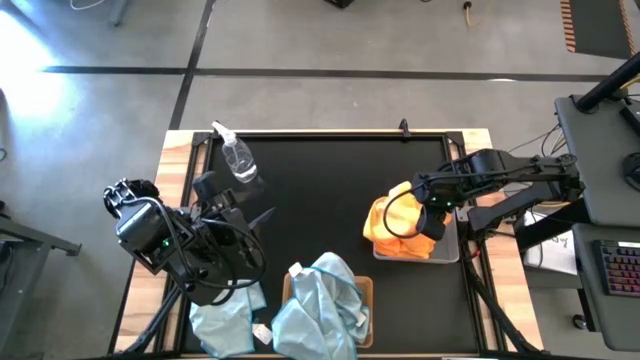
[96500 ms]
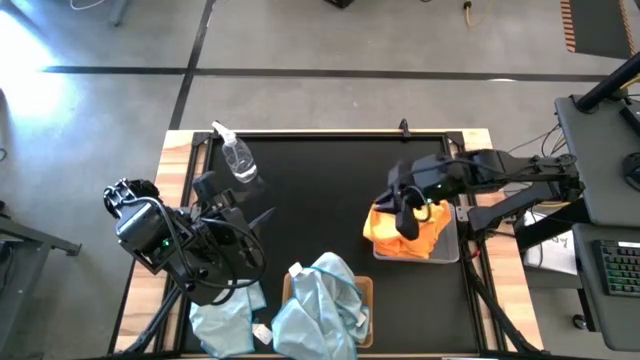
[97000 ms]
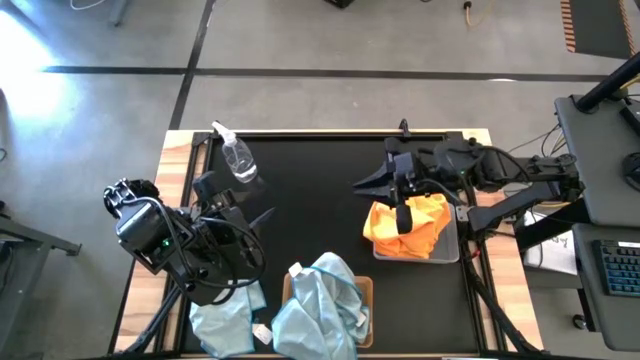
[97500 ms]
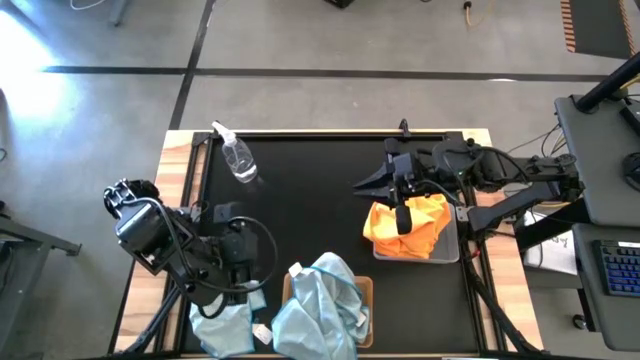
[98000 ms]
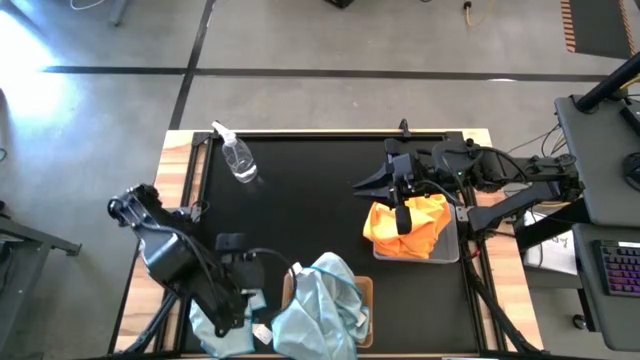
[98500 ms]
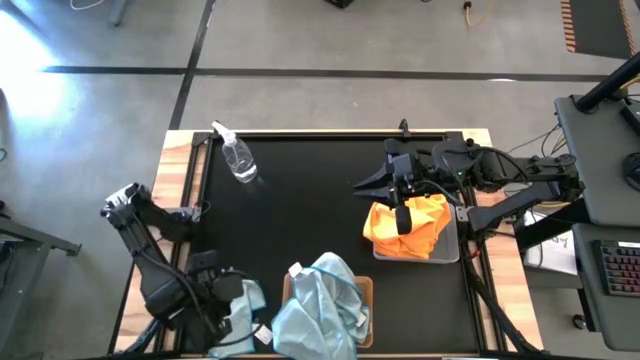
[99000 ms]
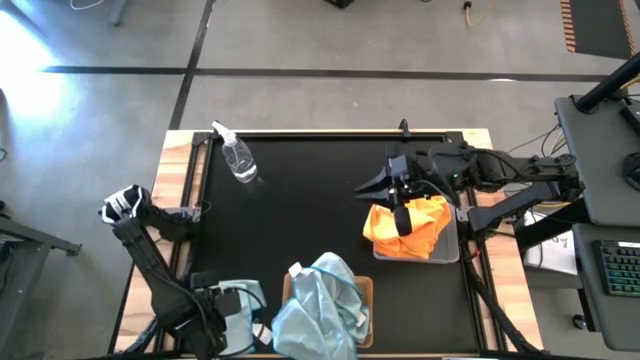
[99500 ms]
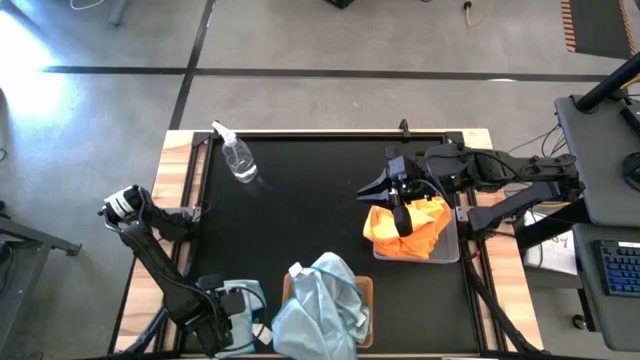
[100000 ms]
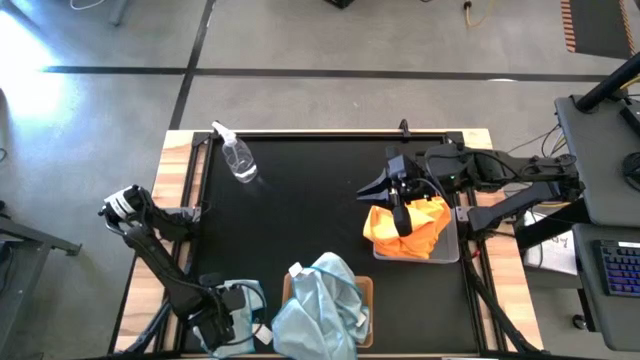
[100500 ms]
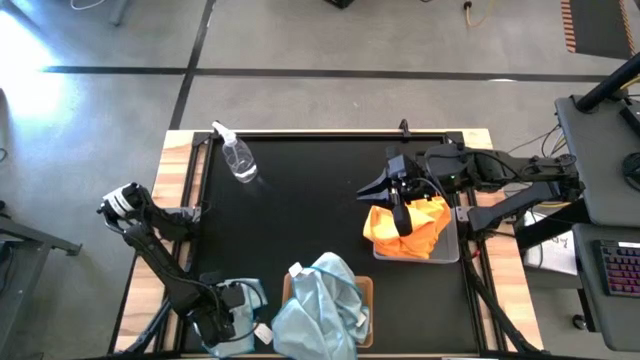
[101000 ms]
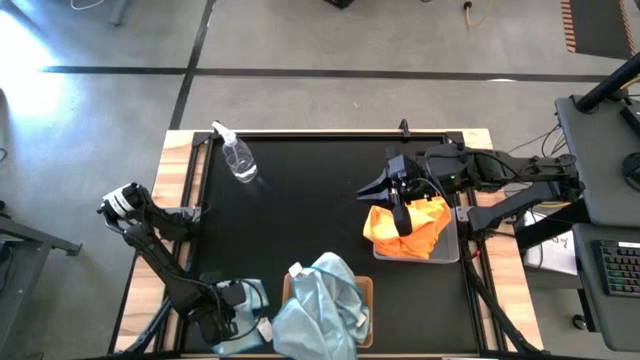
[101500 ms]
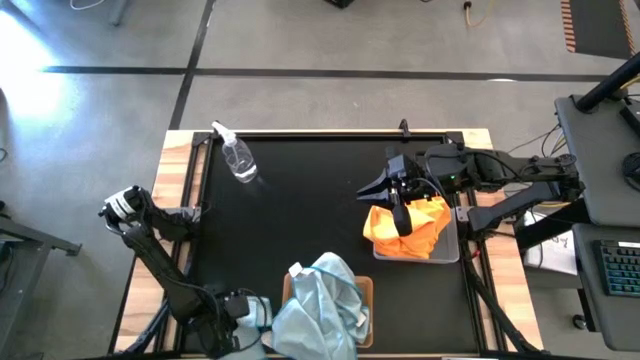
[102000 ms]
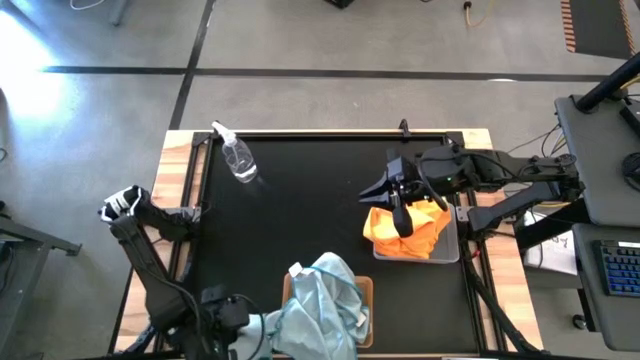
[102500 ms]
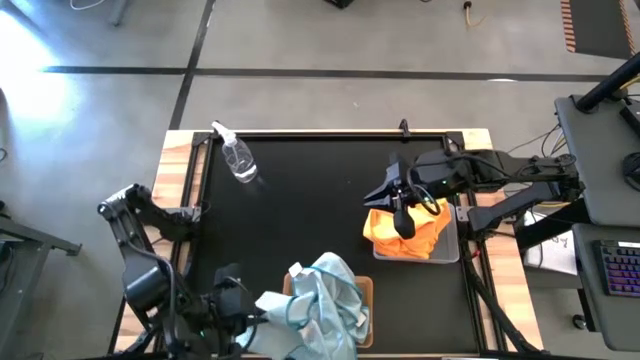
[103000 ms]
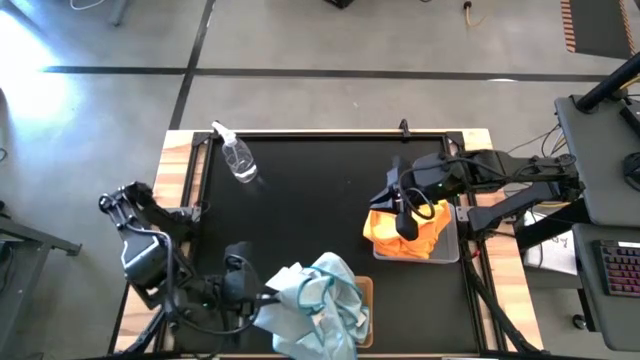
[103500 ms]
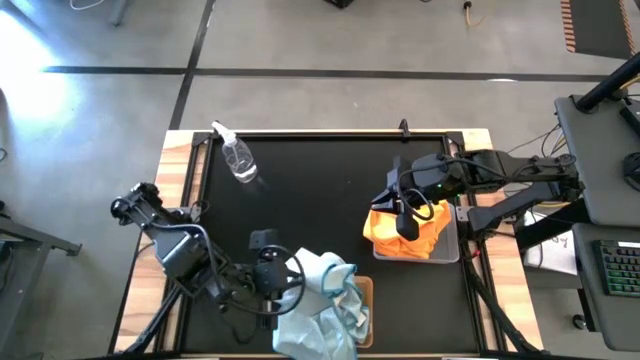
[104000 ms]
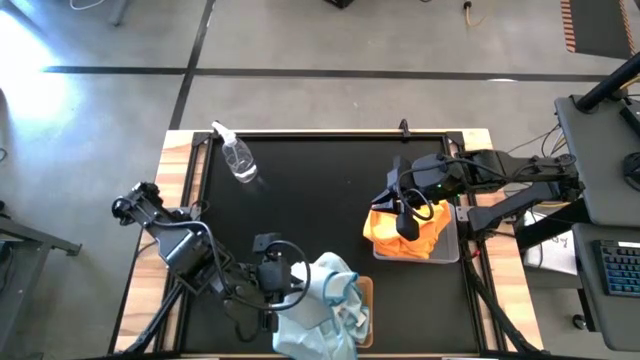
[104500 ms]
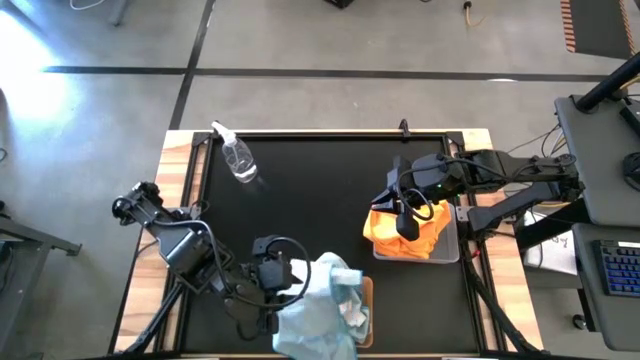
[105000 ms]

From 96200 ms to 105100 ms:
Task: Sort microfiber towel by color & place in baskets
Put the blue microfiber towel into the orange bin

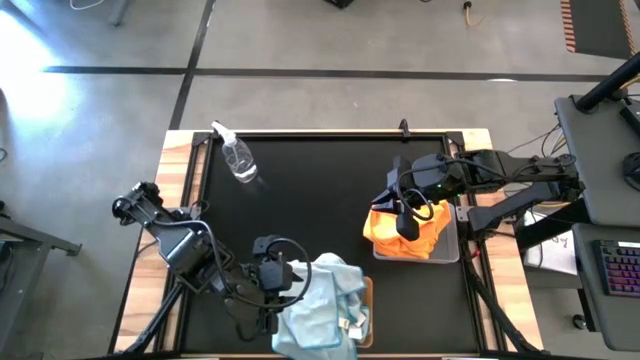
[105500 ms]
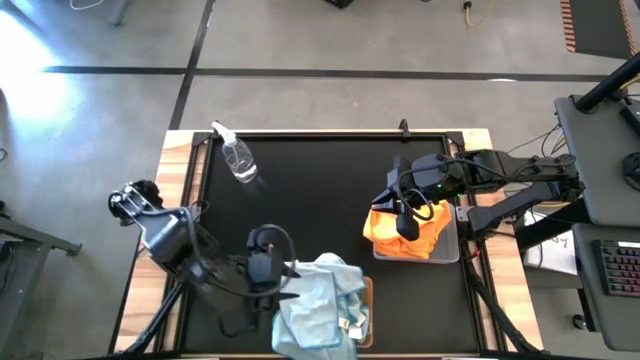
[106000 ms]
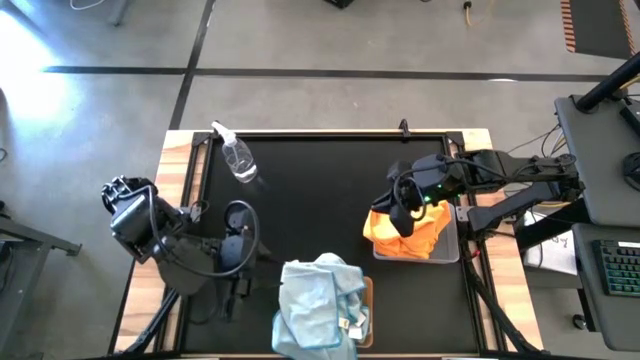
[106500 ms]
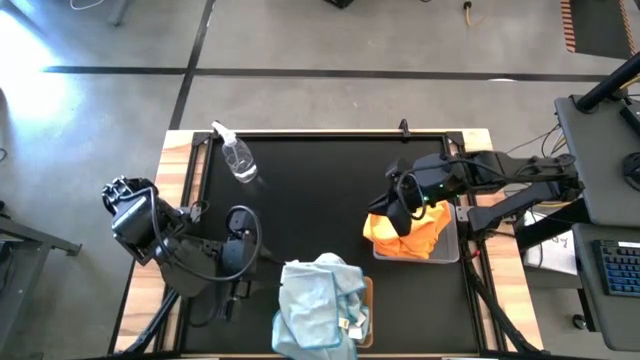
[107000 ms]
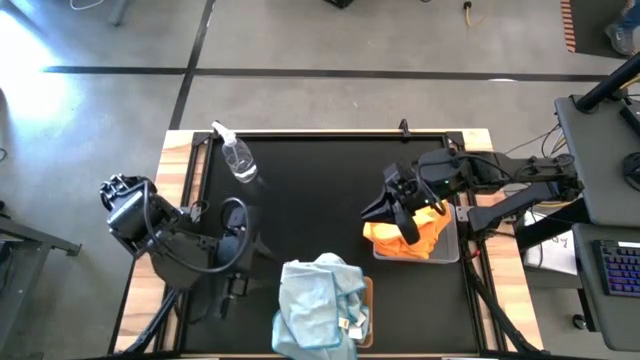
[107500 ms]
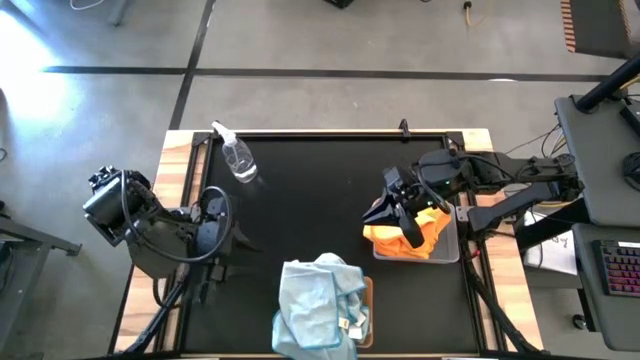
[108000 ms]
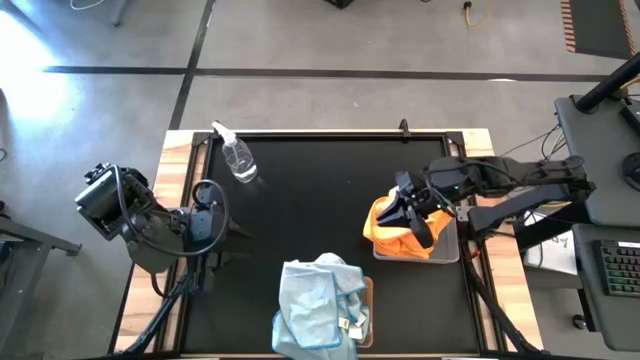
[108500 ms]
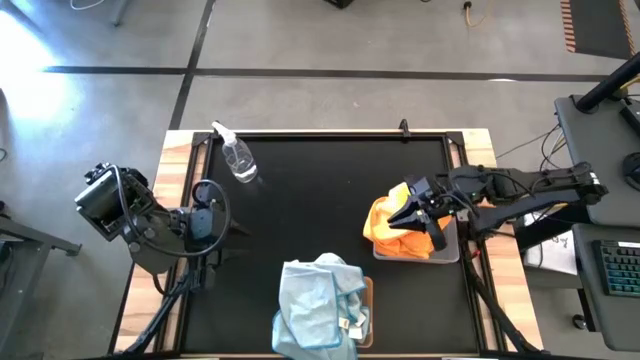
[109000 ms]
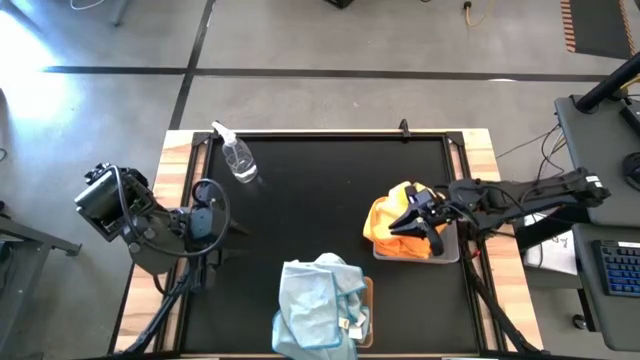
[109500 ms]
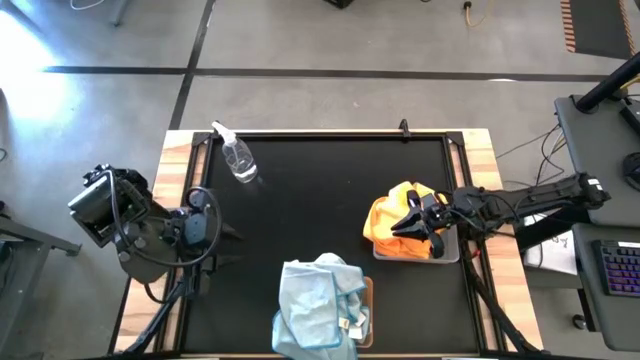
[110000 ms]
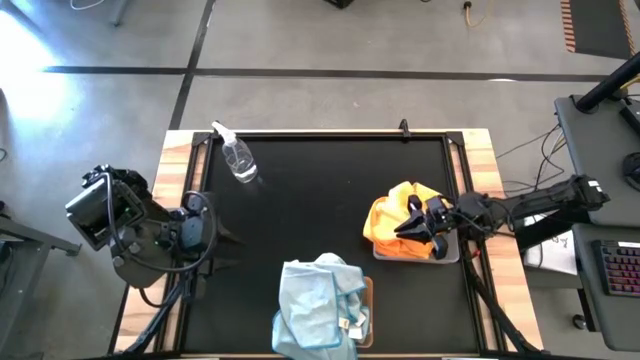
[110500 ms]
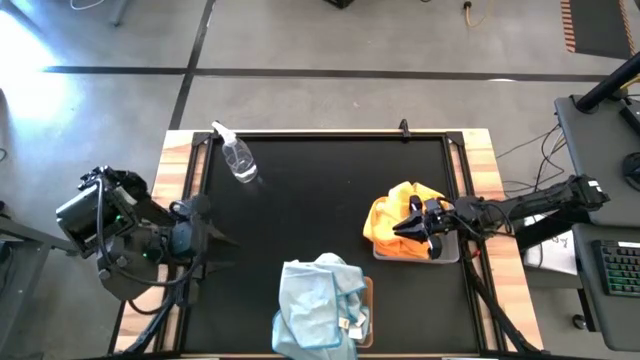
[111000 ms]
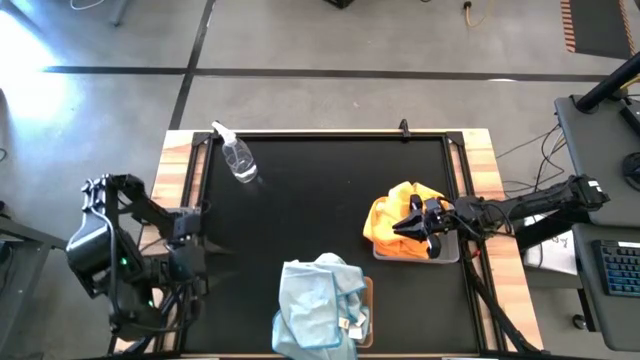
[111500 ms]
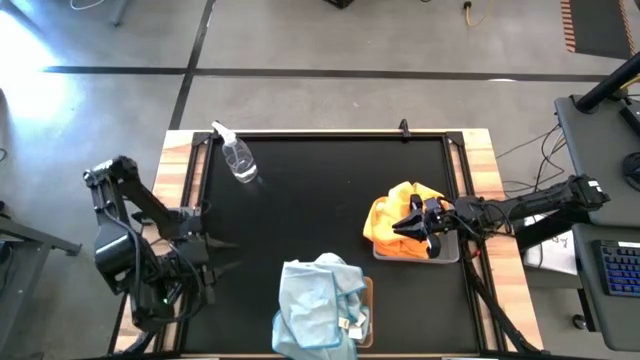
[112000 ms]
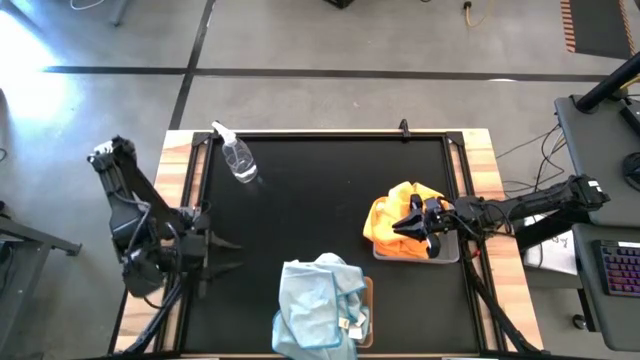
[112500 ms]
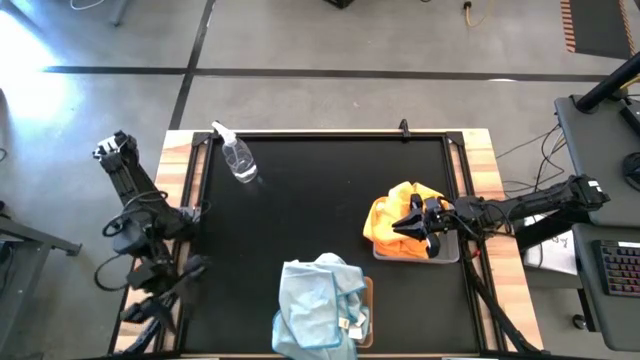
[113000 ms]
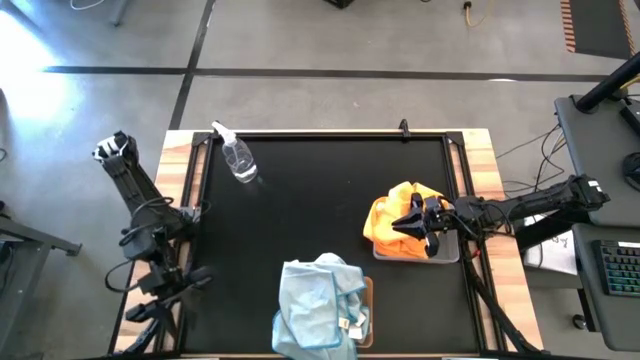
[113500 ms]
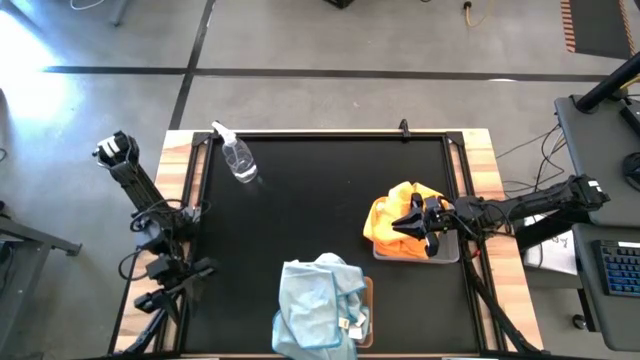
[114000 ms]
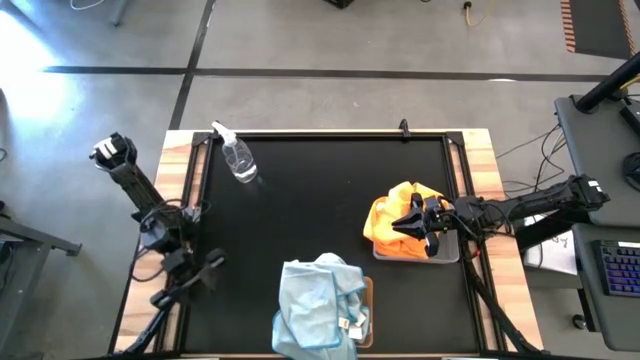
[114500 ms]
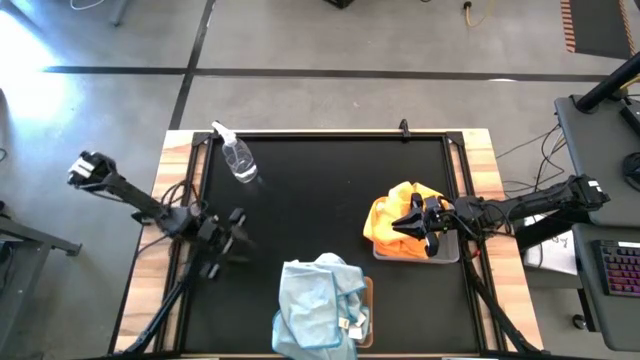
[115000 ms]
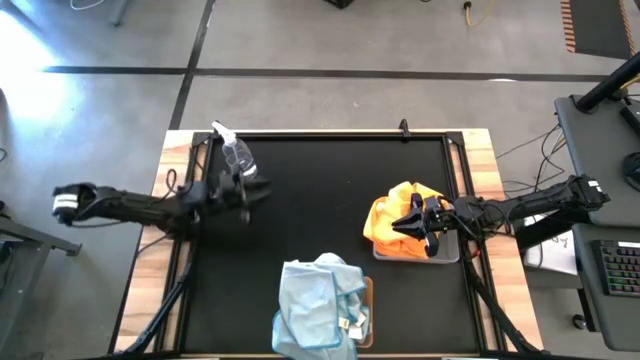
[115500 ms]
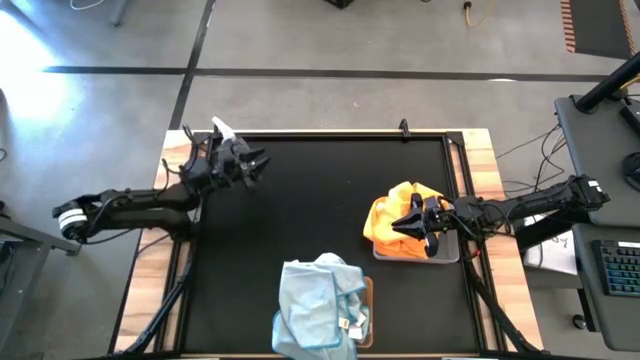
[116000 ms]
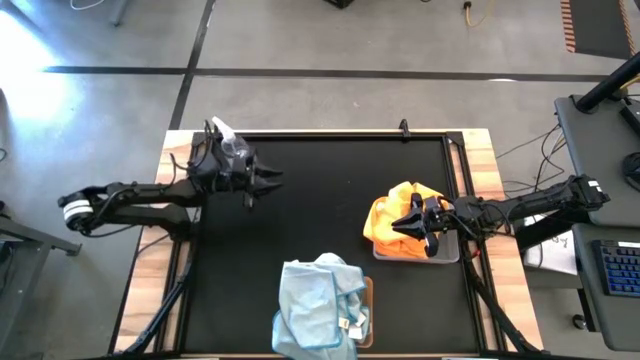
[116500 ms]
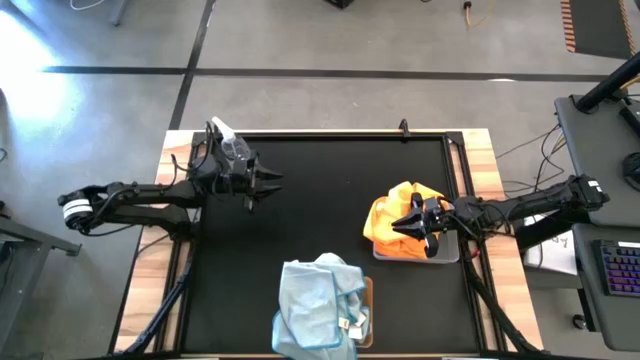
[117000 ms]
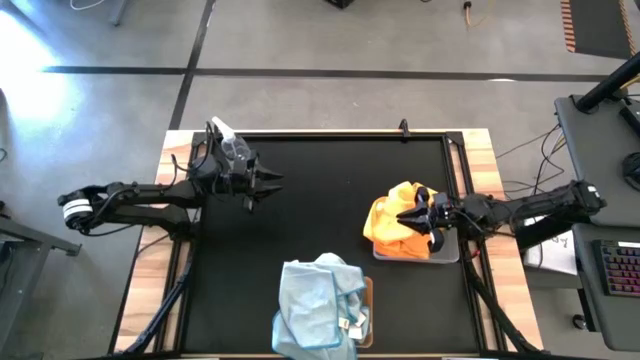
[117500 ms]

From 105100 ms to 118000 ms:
Return to Home Position
